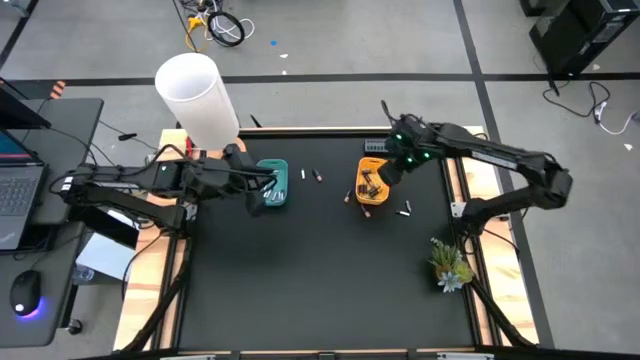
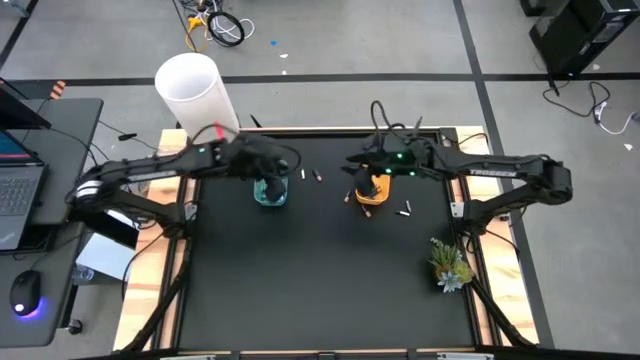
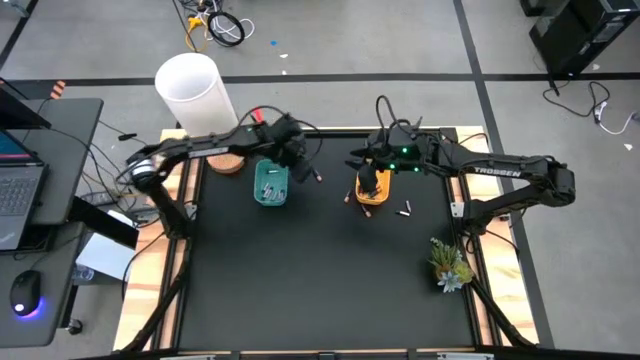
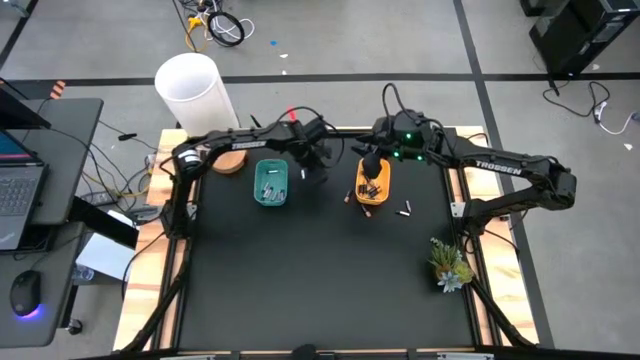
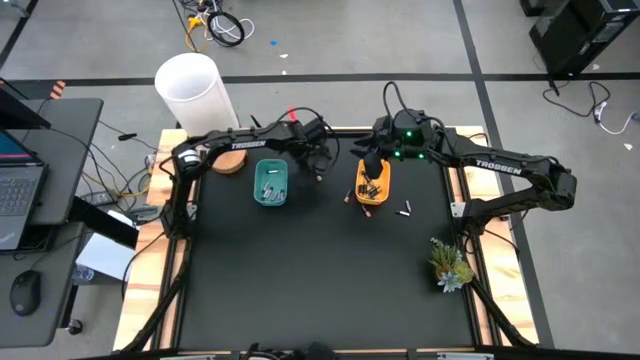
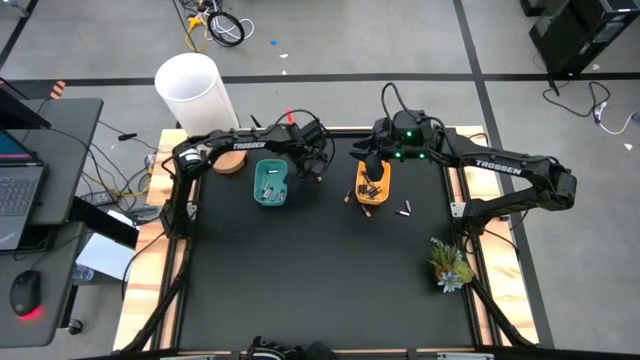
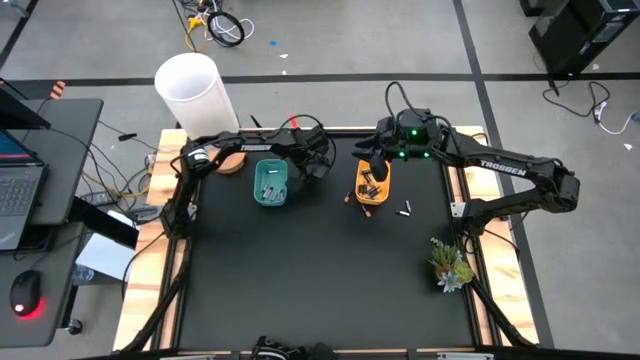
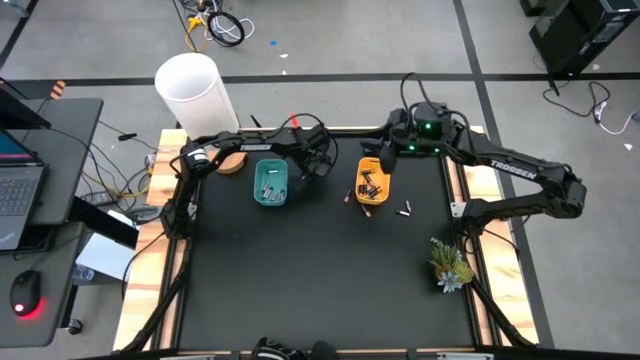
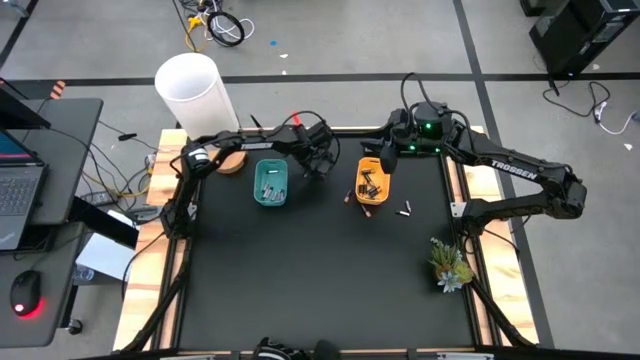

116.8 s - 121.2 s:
Task: Sort batteries
Put the black battery into the yellow bin

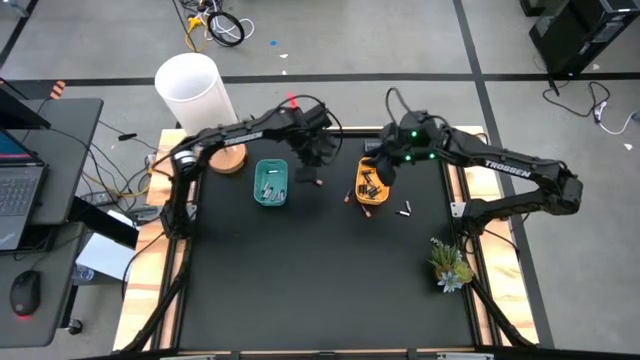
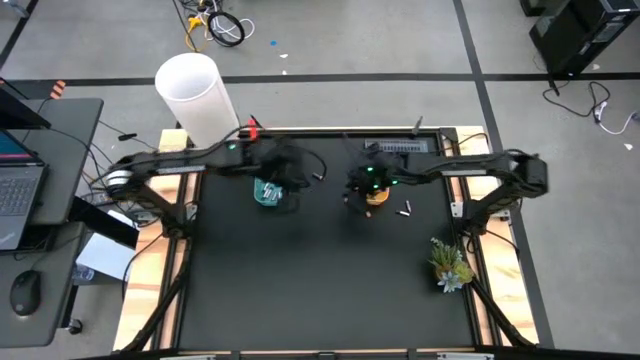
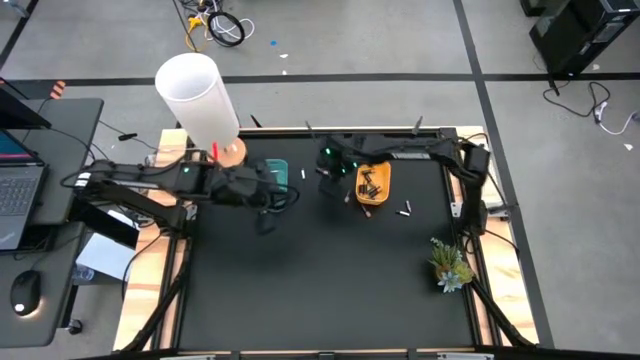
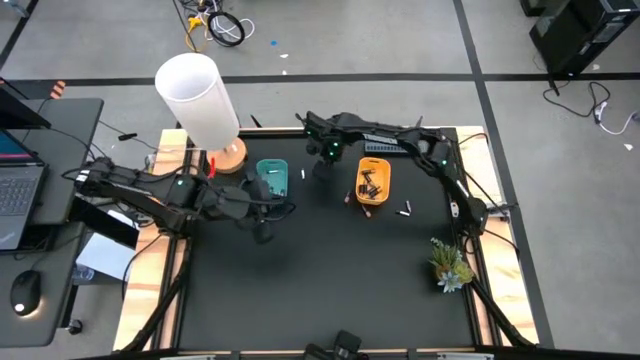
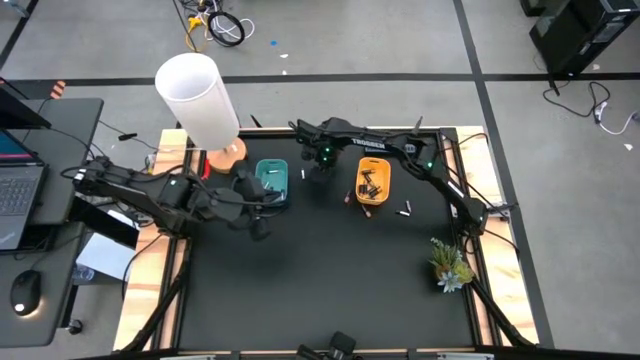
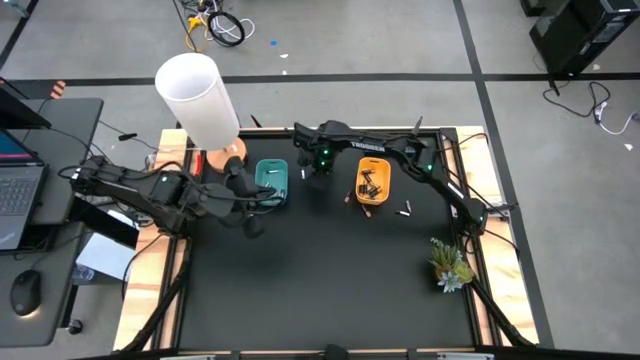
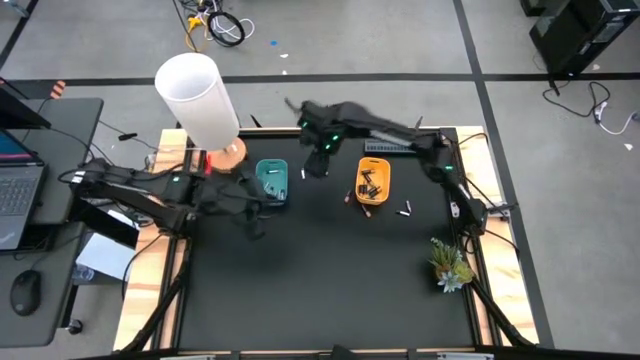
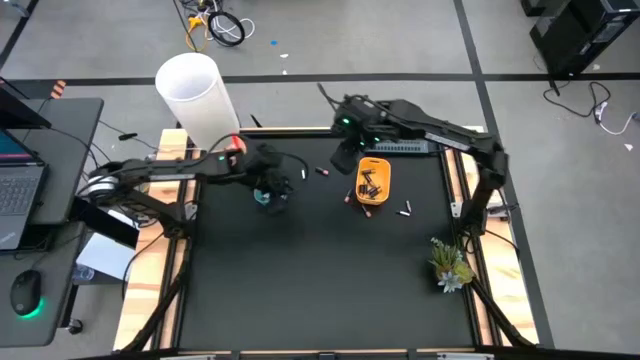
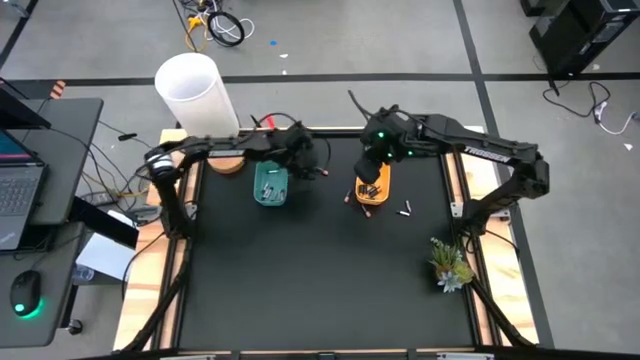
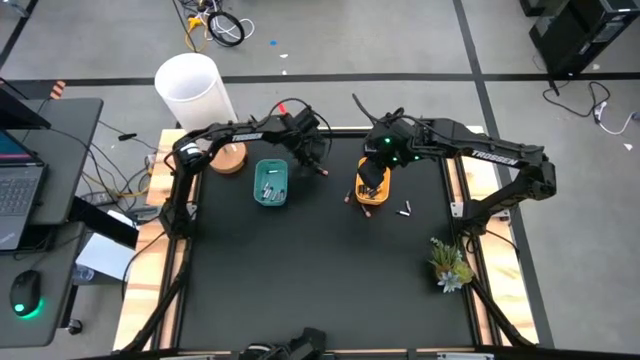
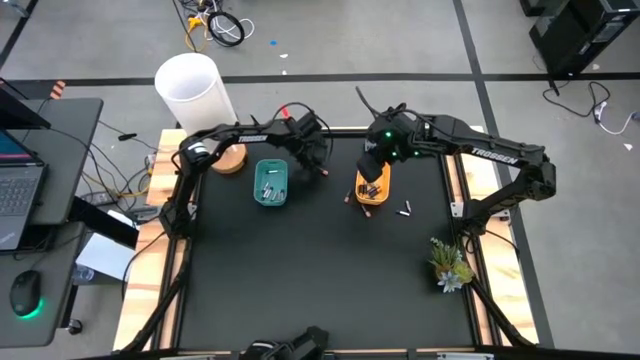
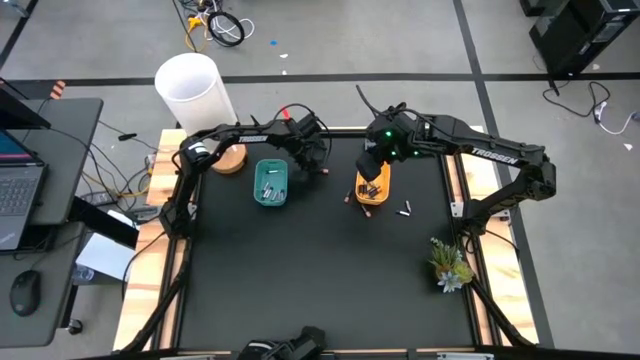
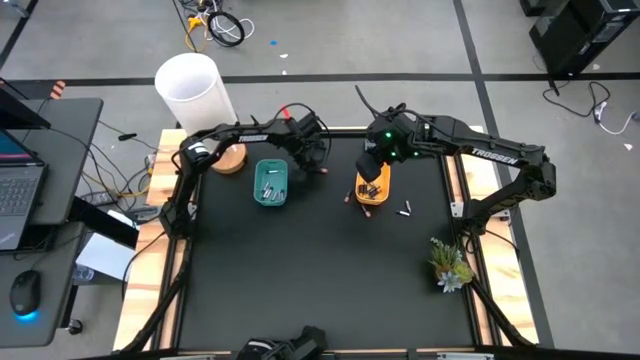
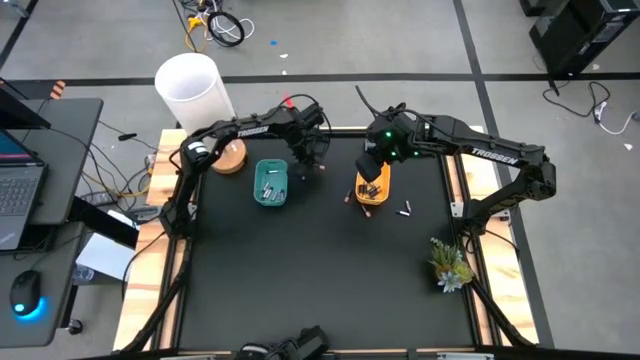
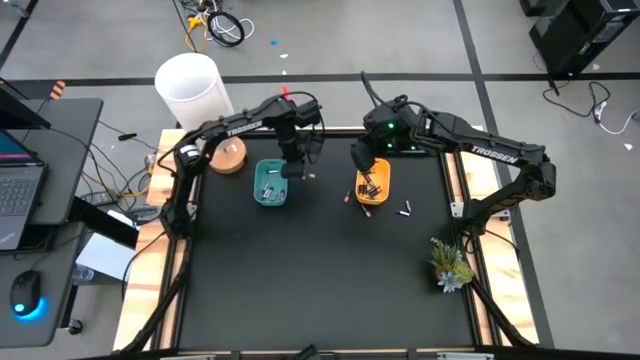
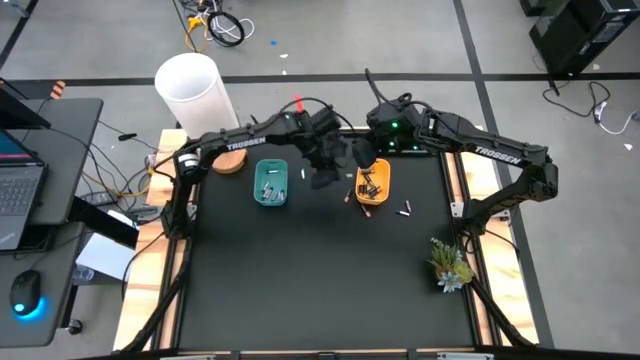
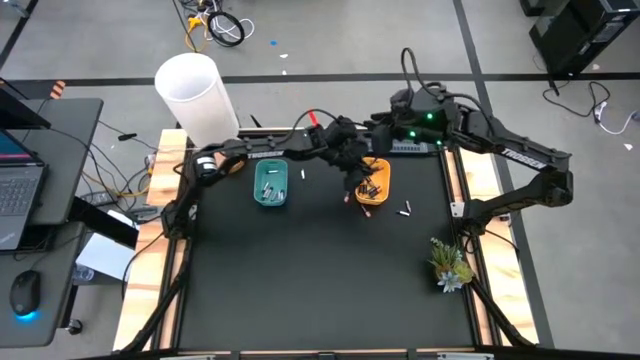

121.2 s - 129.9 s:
Put the black battery into the yellow bin

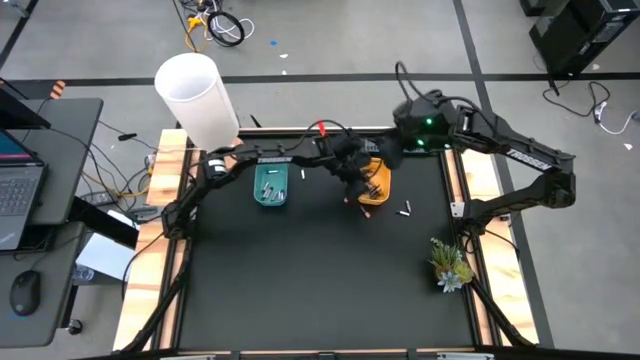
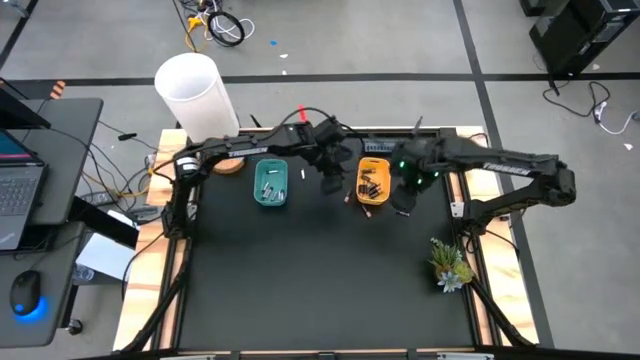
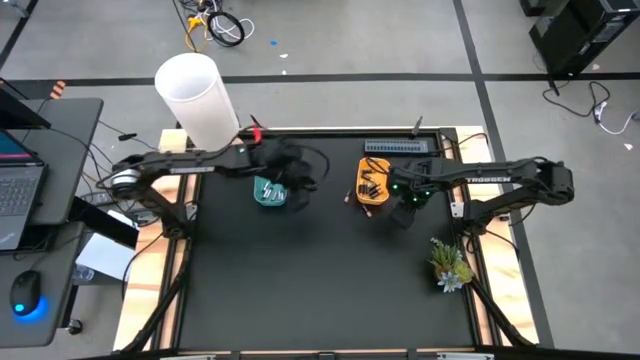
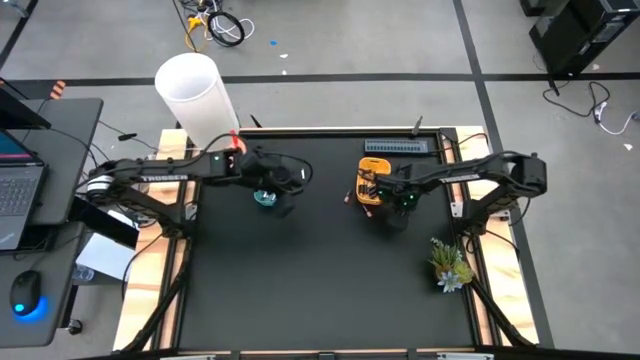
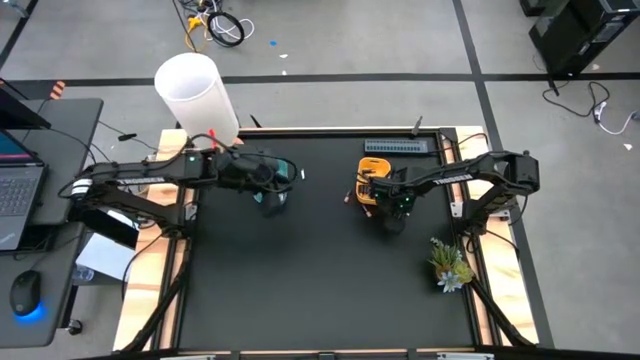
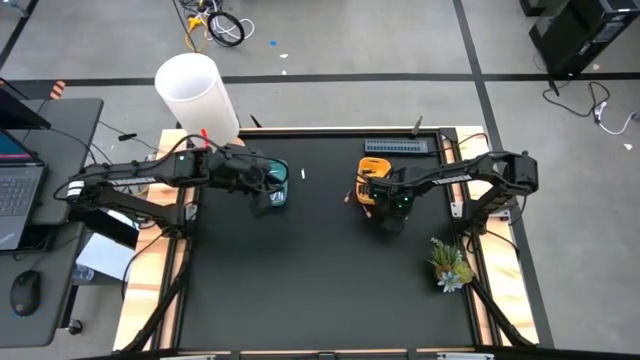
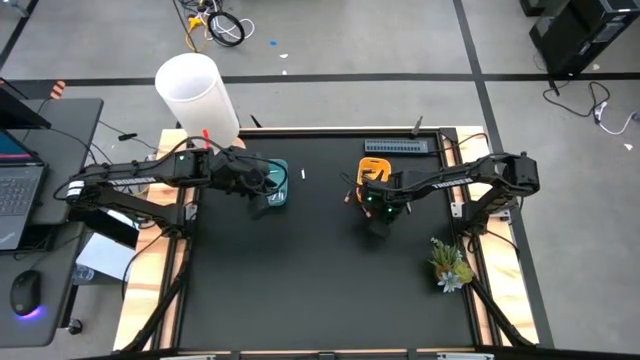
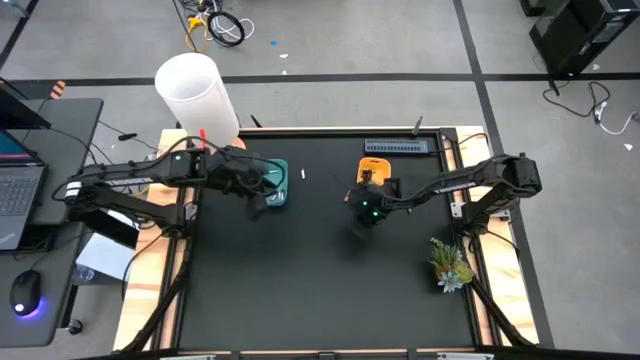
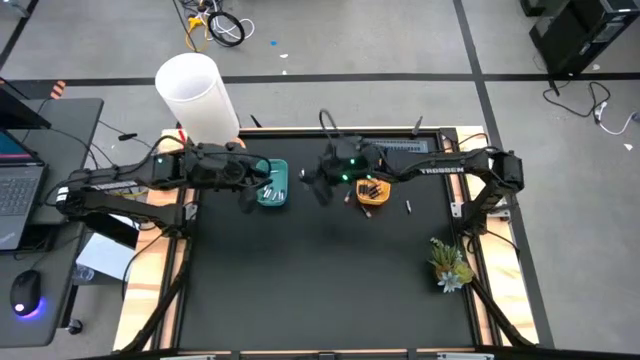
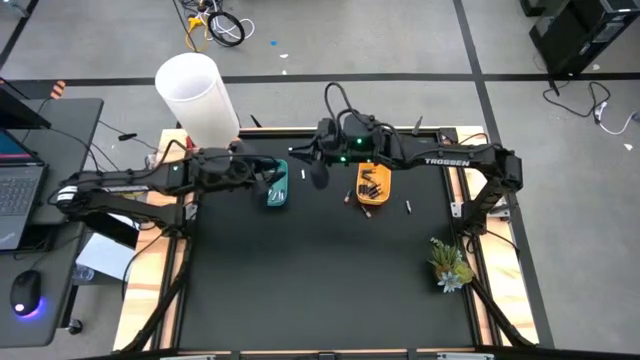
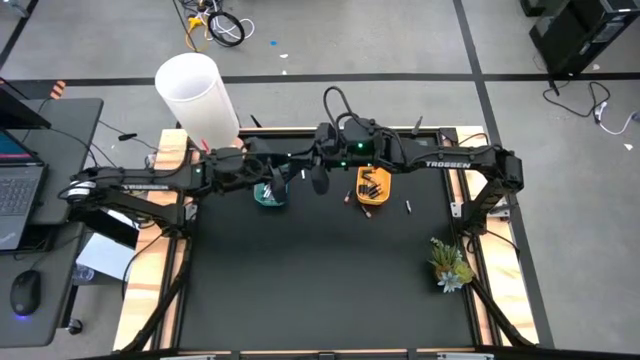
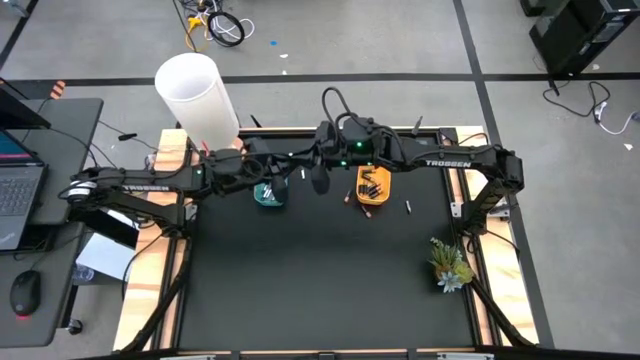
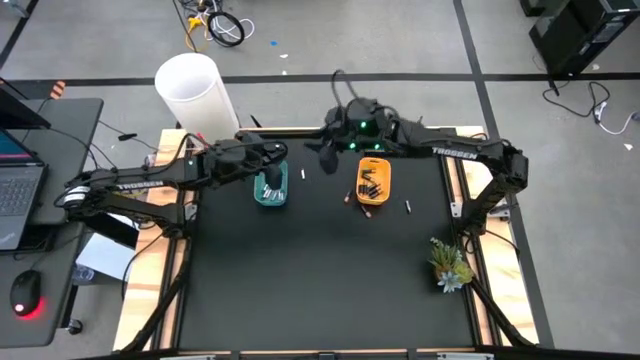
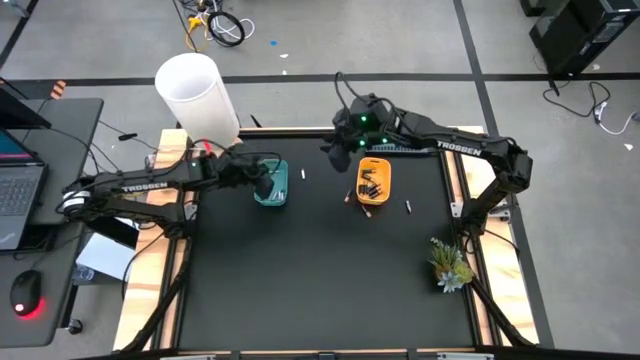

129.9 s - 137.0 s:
Put the silver battery into the blue bin

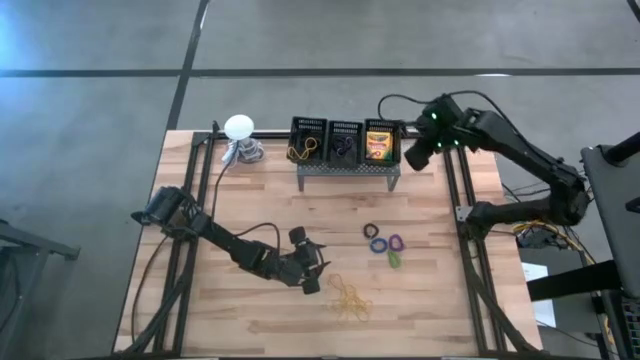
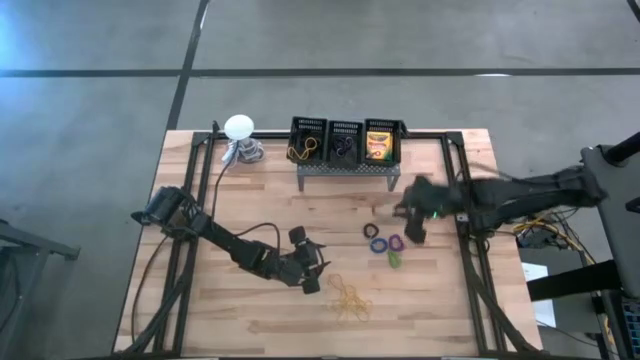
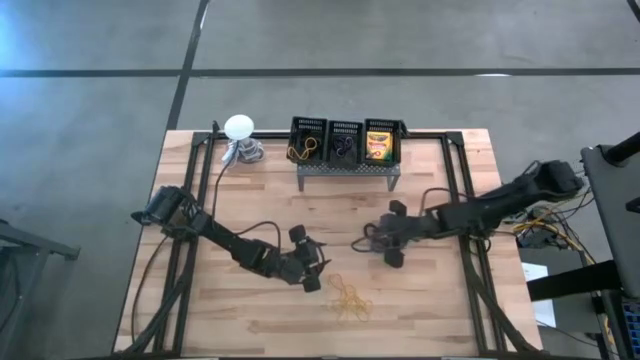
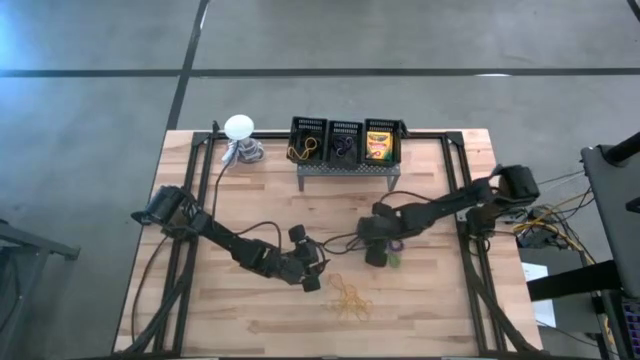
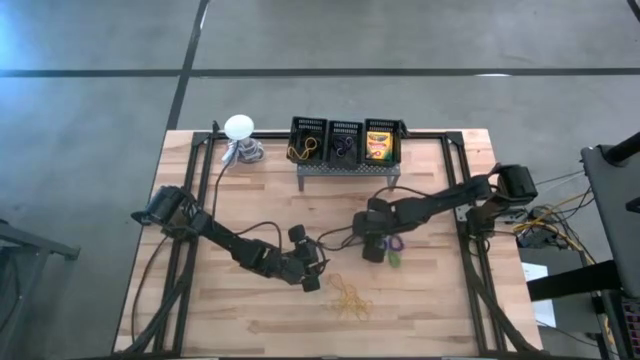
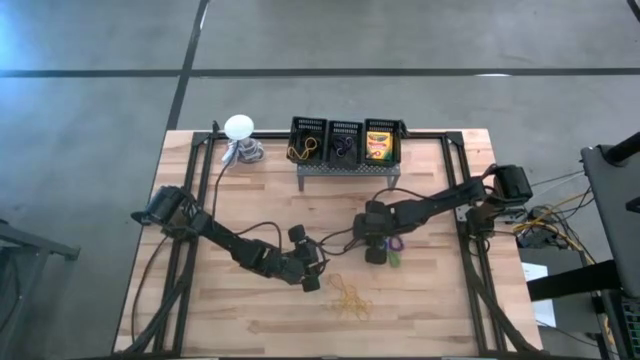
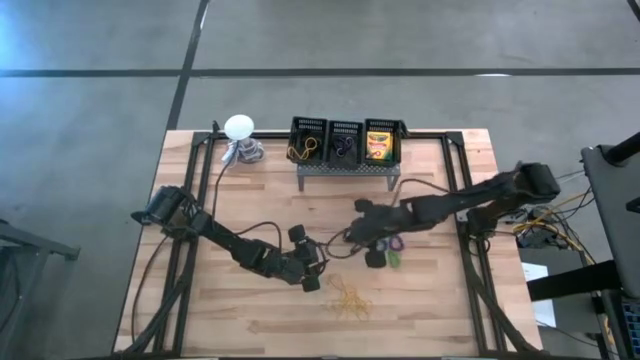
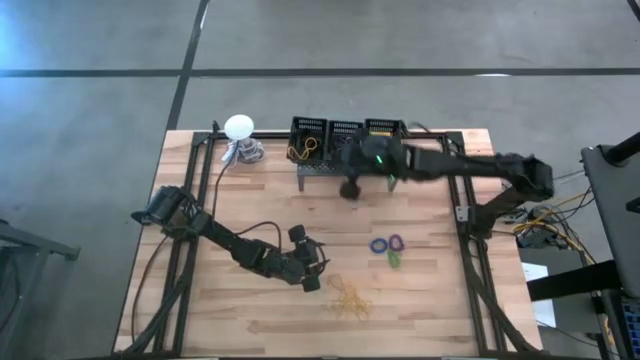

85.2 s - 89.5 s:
Task: Pick & Place Office Desk Supplies
Put the black keychain into the left black bin on the shelf
